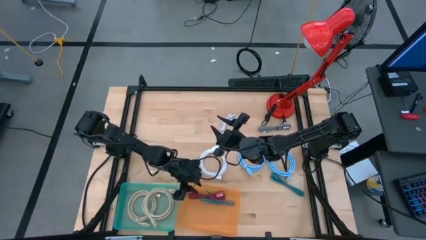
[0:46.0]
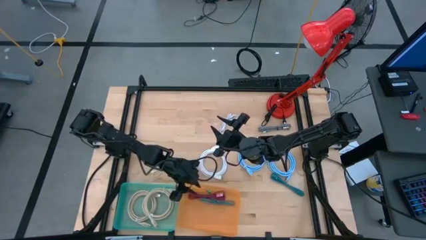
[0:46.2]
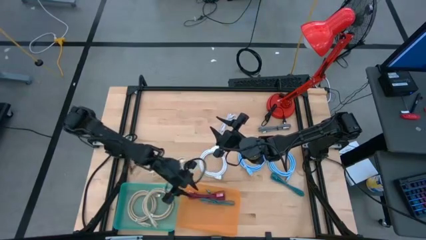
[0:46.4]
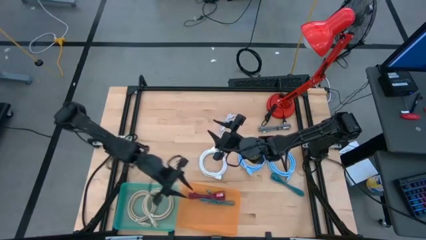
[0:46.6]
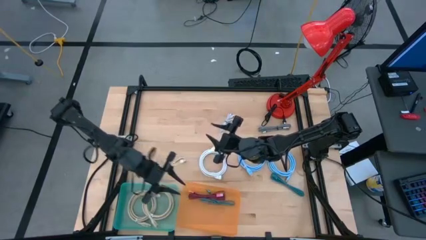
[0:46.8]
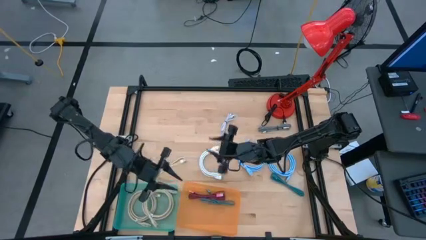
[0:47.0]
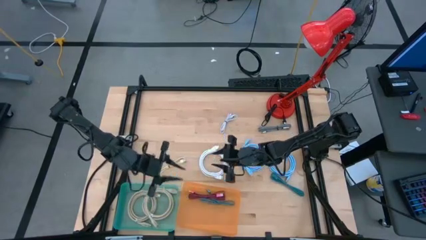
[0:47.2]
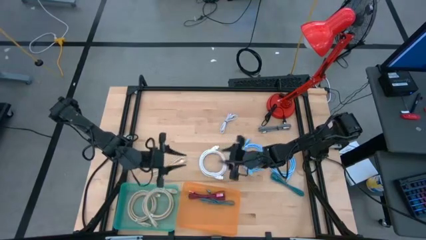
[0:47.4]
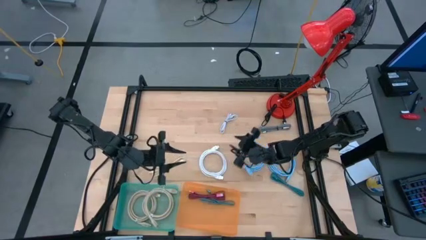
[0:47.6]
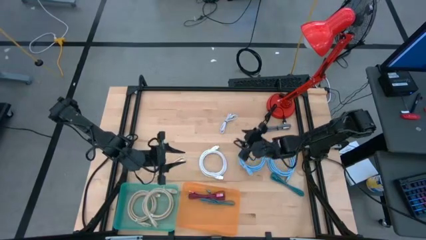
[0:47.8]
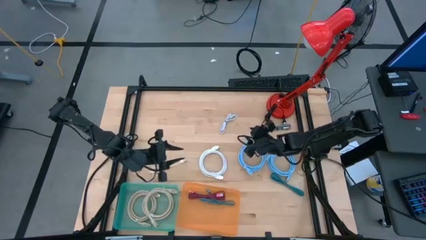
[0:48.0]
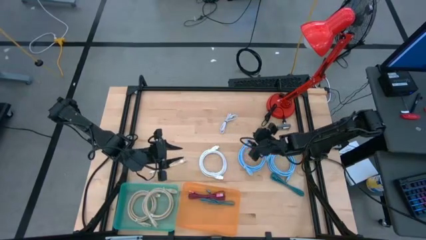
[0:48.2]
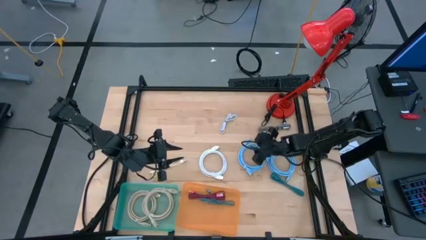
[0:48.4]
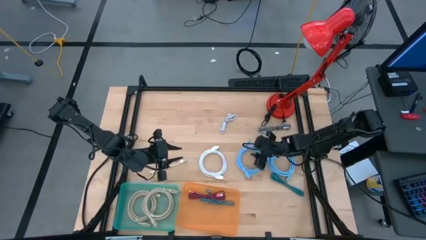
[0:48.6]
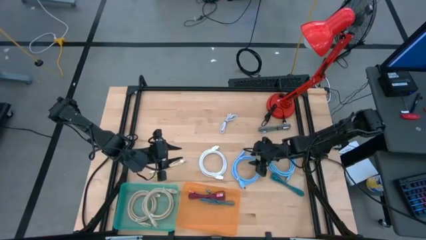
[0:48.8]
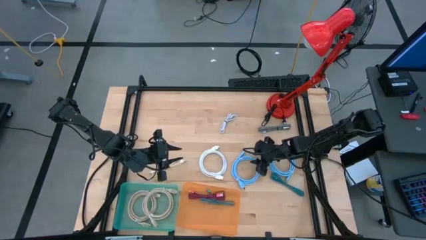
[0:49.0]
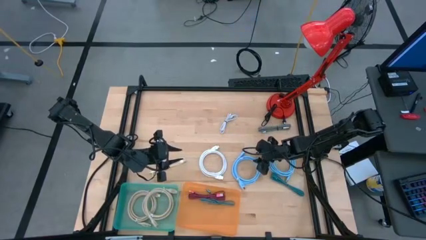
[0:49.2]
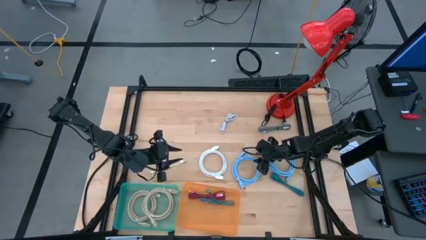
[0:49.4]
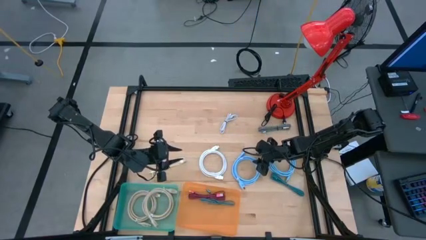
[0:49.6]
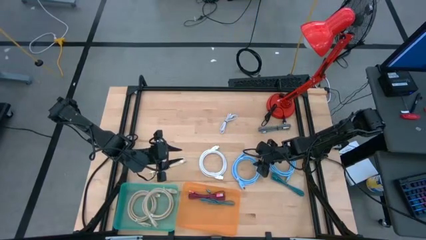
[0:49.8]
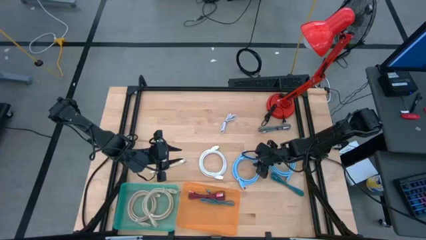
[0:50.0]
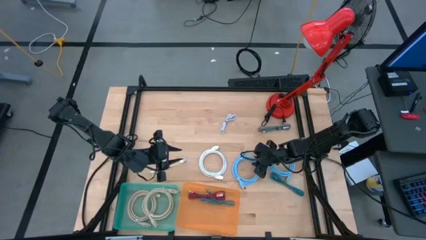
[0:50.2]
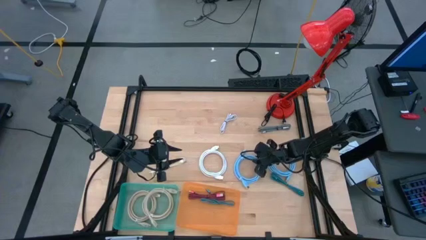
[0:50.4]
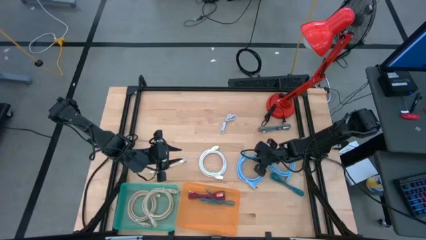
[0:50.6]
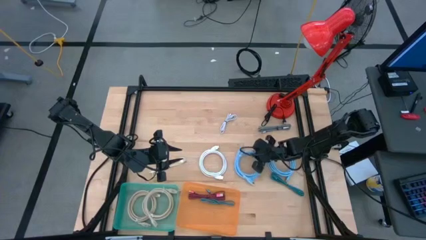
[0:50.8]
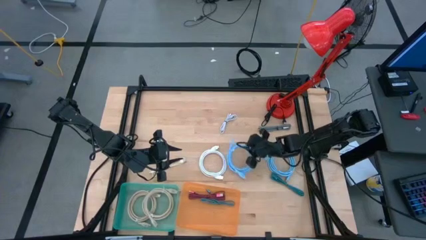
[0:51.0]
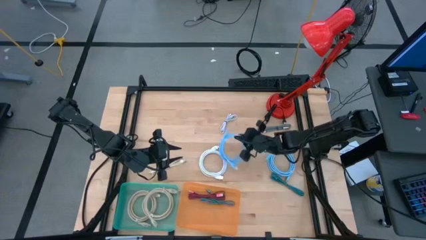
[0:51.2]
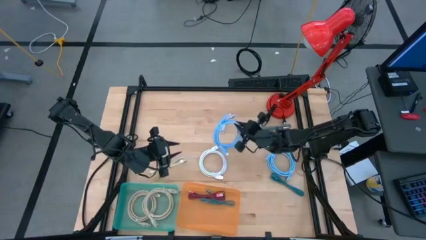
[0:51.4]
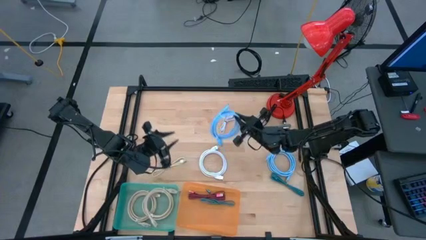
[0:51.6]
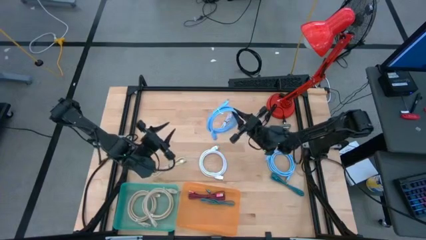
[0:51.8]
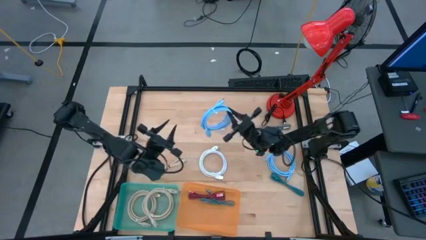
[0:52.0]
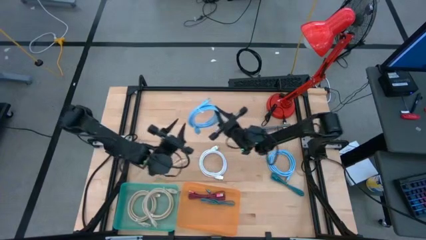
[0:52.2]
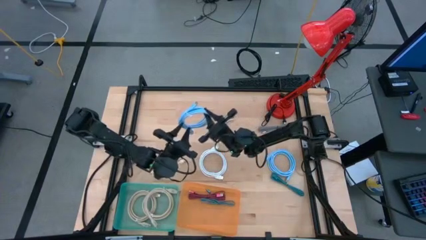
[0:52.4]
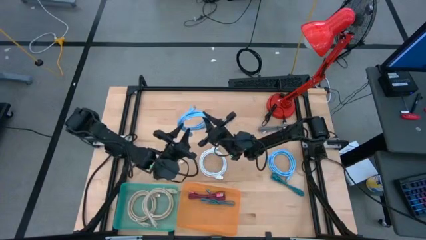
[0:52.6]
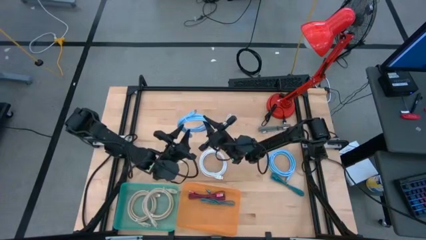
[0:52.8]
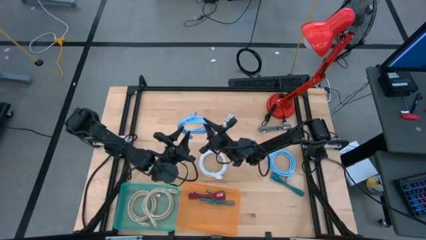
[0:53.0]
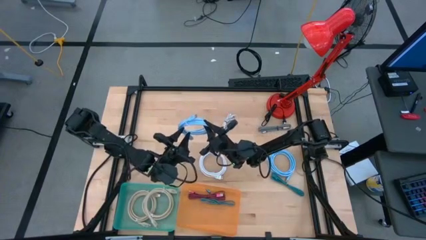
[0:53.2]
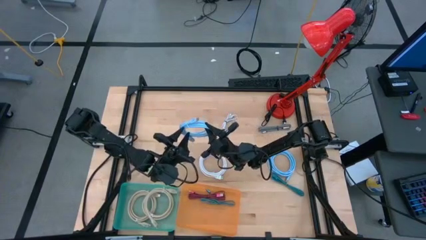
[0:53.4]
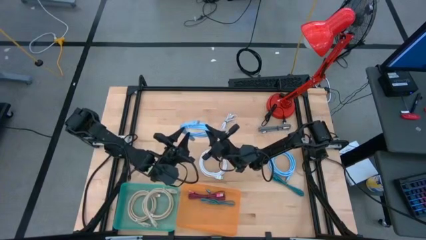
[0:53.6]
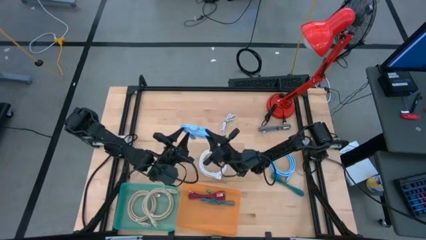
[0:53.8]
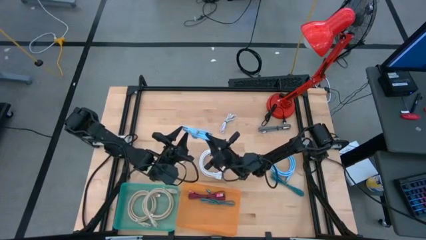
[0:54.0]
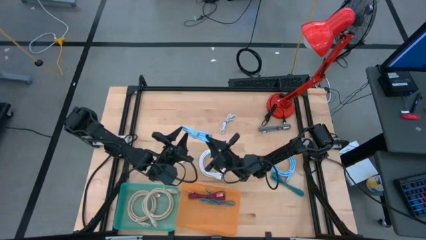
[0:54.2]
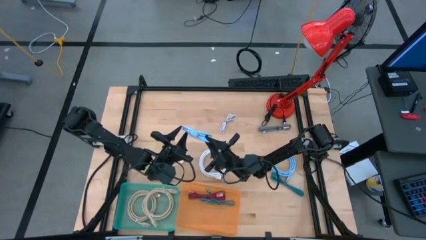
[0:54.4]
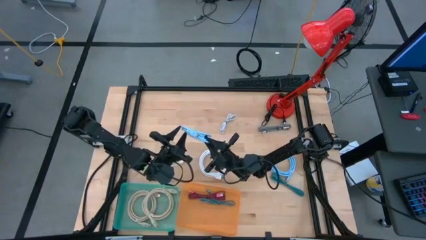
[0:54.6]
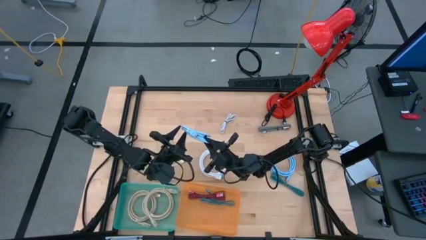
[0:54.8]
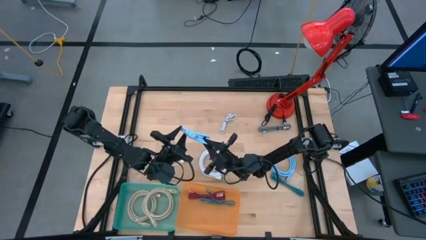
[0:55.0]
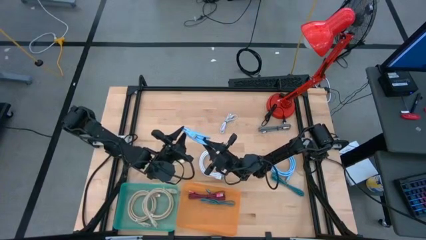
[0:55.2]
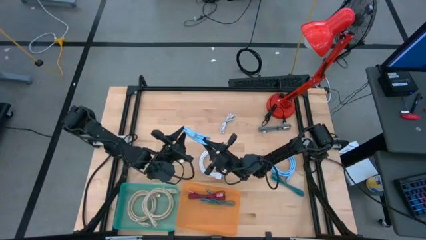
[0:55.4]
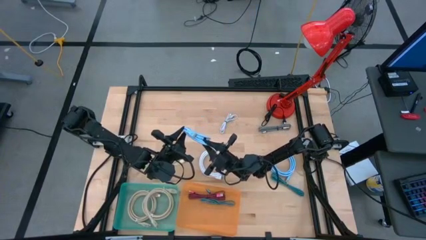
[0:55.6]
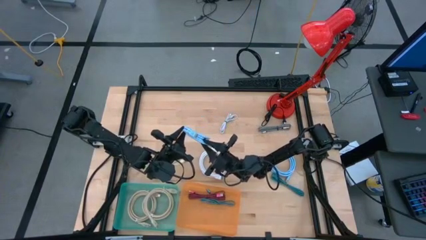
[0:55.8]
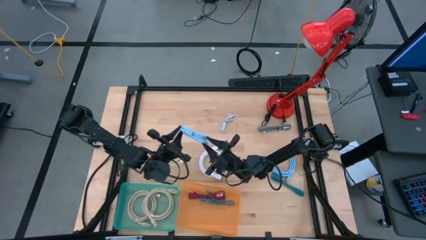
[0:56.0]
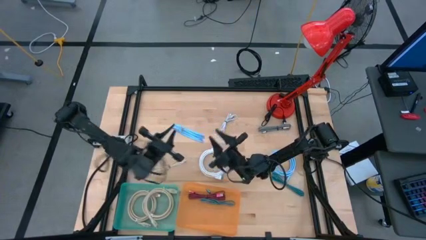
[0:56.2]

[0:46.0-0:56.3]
Task: Pick & Place USB Port
Put the left blue HDMI cable into the green bin

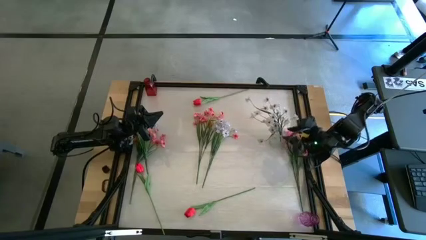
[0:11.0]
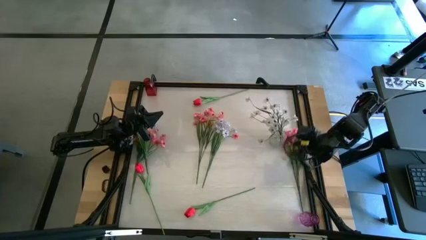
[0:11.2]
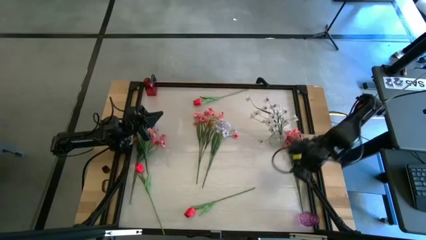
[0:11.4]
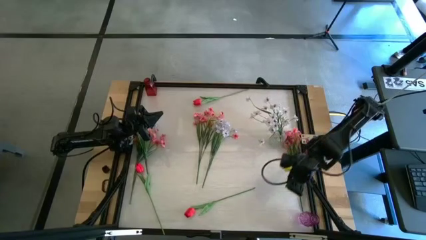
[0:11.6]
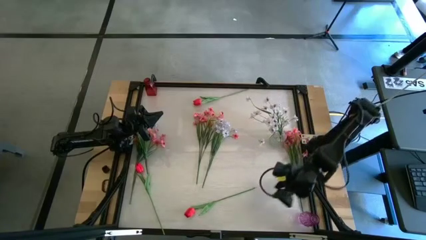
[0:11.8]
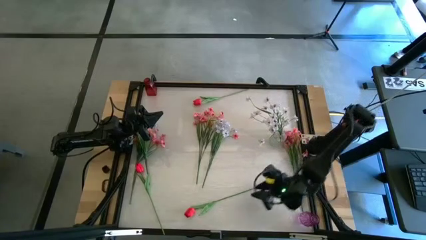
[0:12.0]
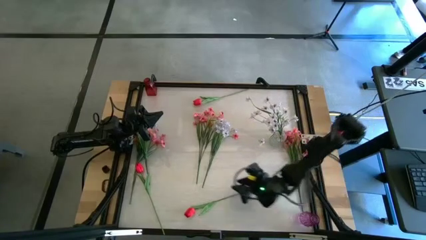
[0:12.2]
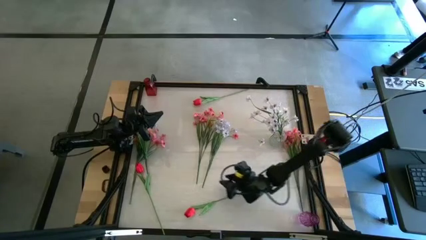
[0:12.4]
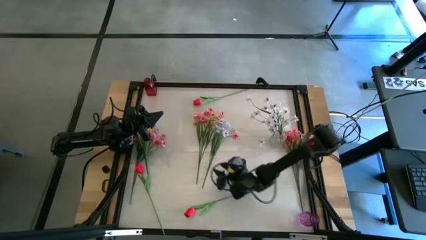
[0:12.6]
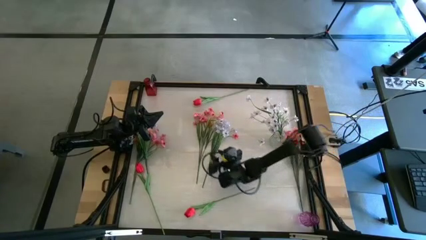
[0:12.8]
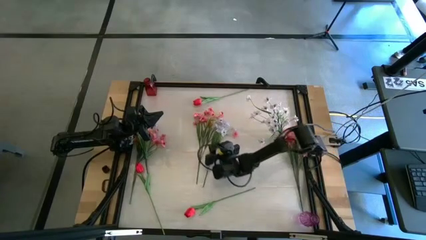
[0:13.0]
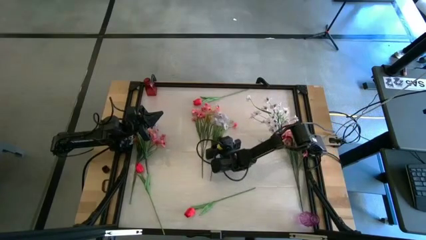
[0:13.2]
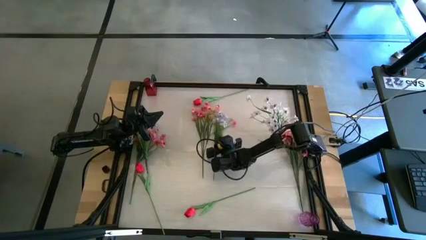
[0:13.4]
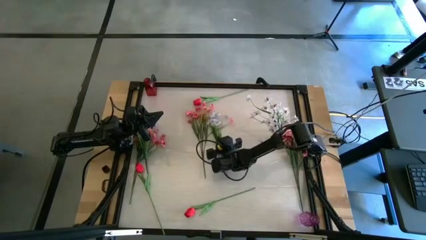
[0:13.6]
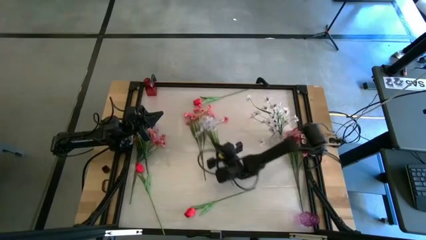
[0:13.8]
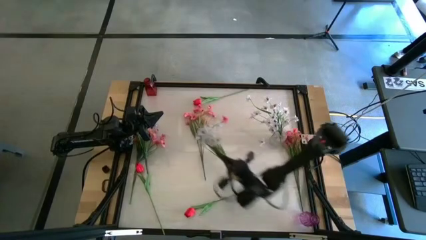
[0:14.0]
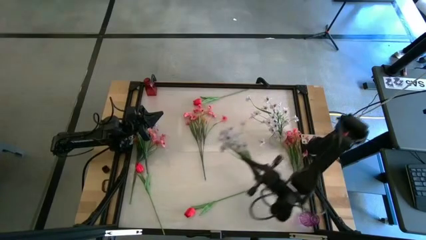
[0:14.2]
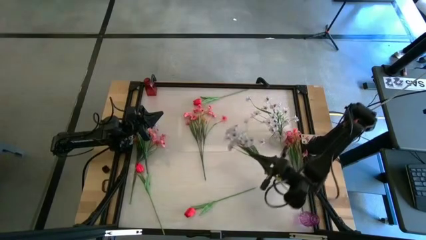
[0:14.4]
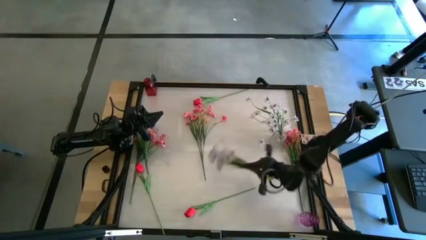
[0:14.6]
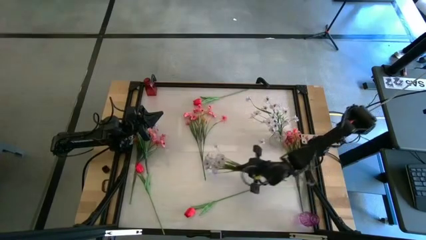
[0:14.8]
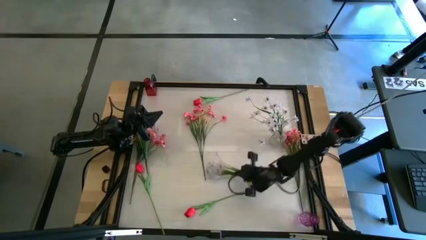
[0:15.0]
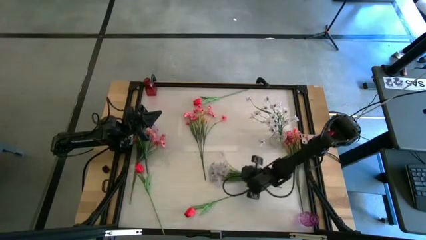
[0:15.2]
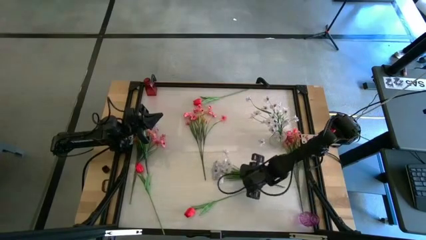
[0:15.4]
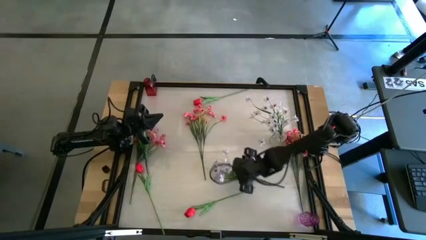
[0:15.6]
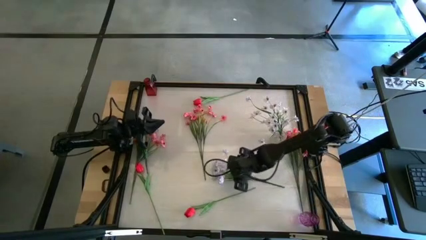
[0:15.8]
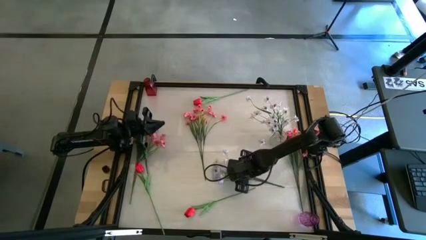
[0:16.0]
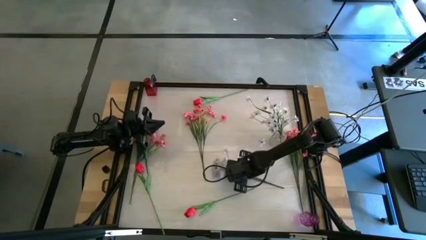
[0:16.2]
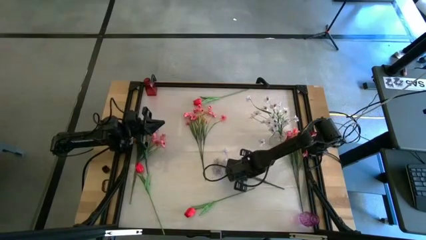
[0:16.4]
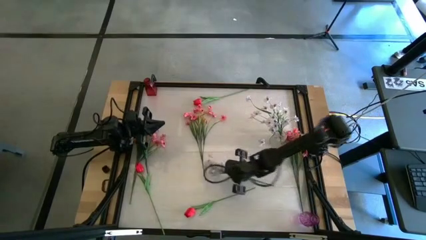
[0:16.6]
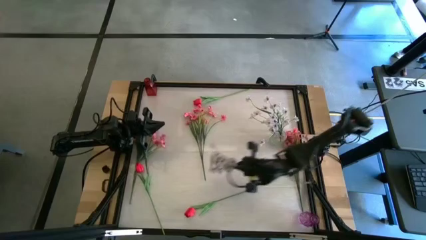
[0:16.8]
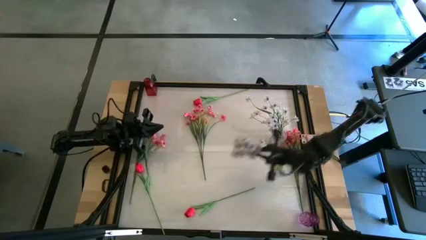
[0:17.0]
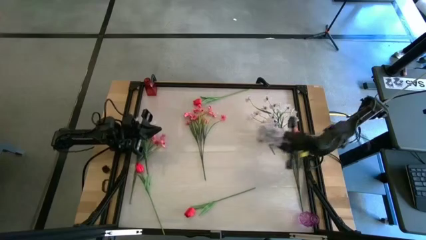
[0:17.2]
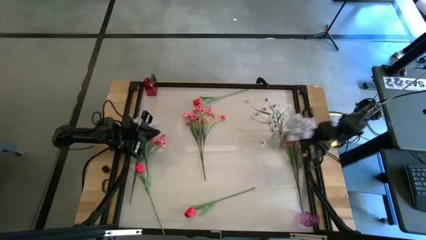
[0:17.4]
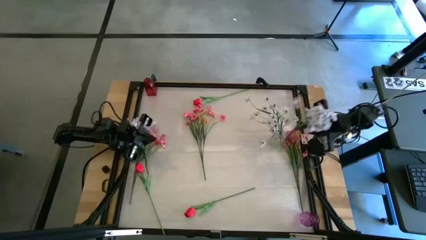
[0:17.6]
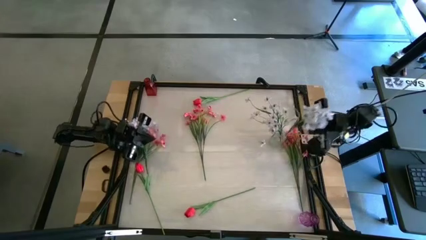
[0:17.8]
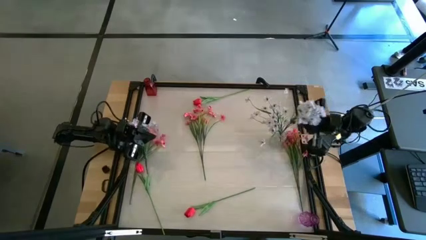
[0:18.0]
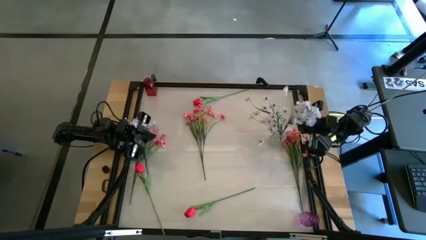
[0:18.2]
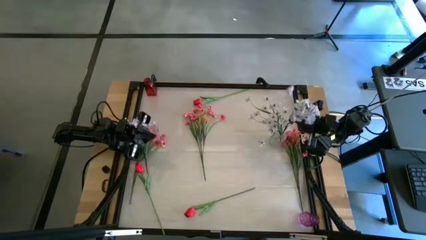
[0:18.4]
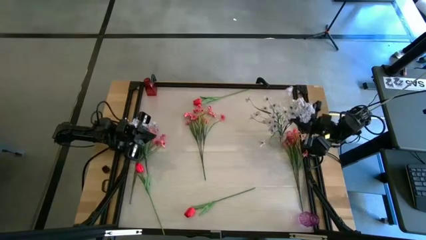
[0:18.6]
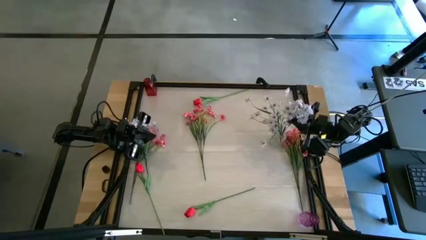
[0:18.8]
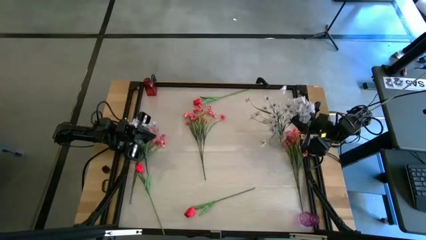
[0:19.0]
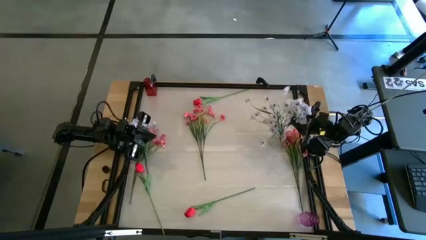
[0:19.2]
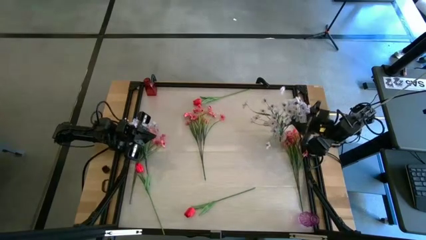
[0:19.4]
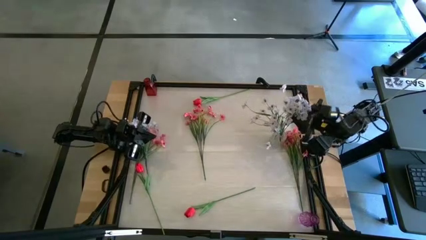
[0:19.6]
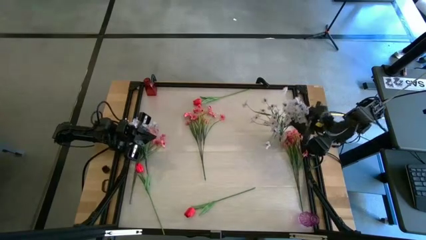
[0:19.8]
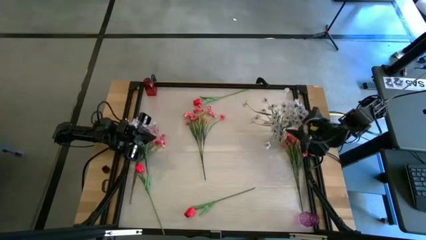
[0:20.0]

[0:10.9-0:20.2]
Task: Sort flowers into vase by color
Put the right white flowers into the transparent vase
